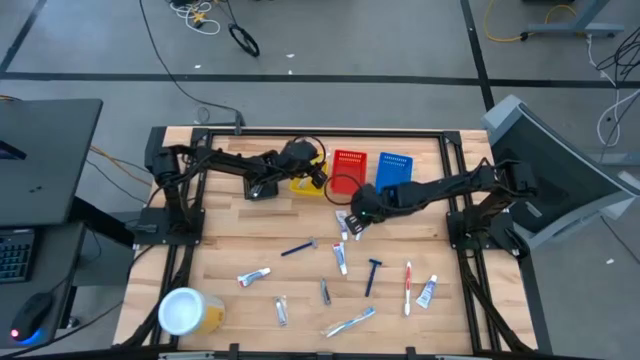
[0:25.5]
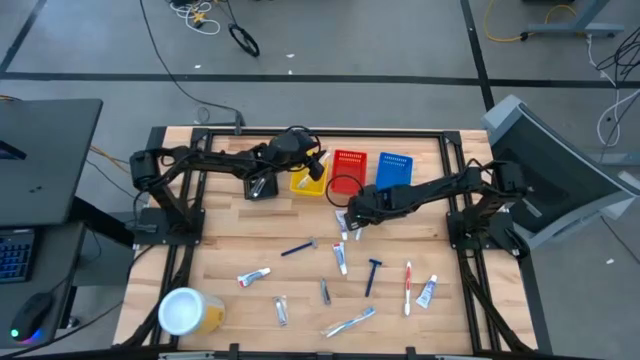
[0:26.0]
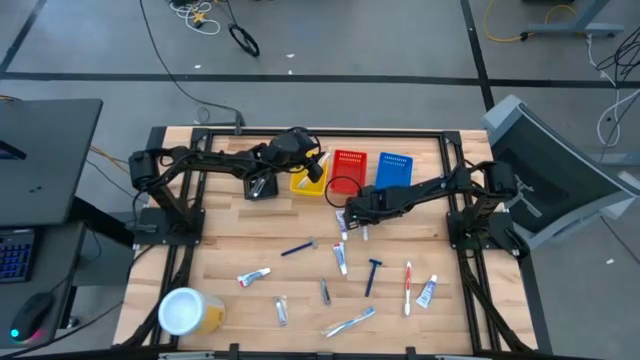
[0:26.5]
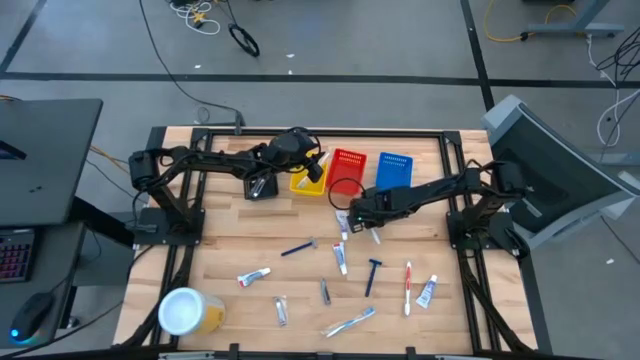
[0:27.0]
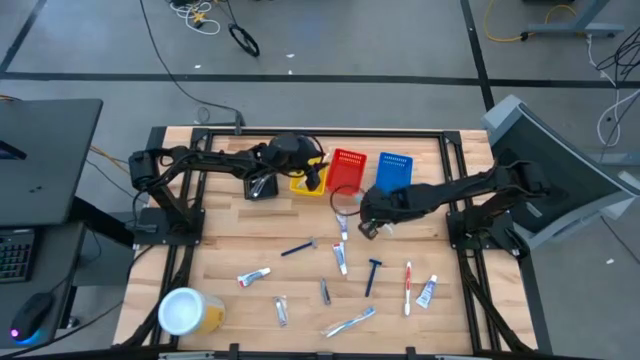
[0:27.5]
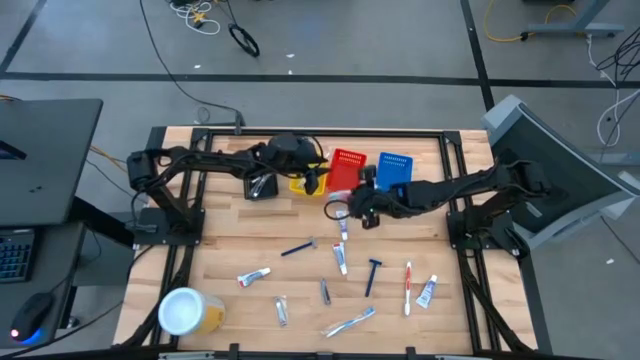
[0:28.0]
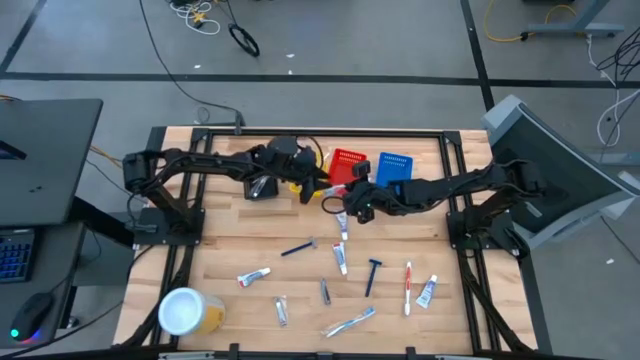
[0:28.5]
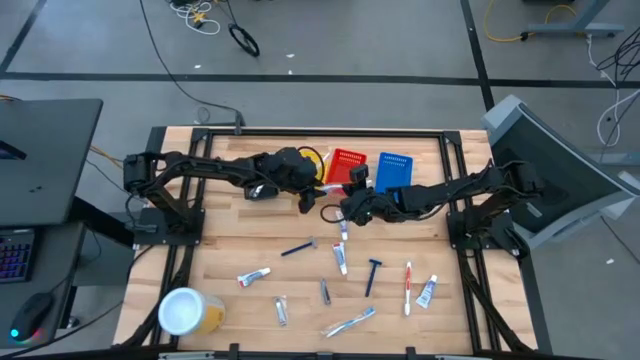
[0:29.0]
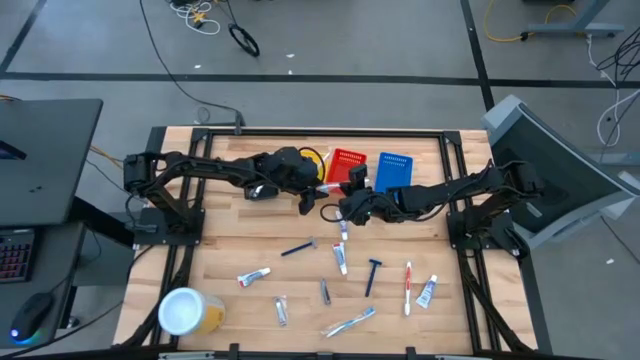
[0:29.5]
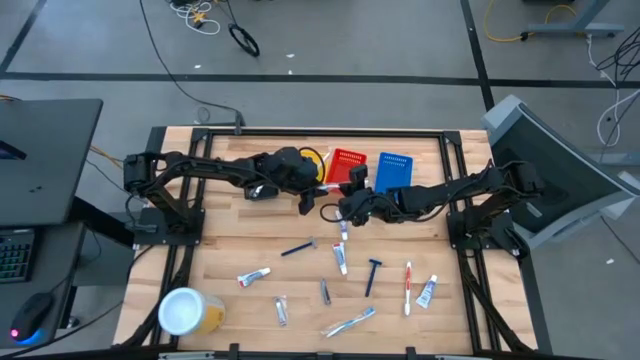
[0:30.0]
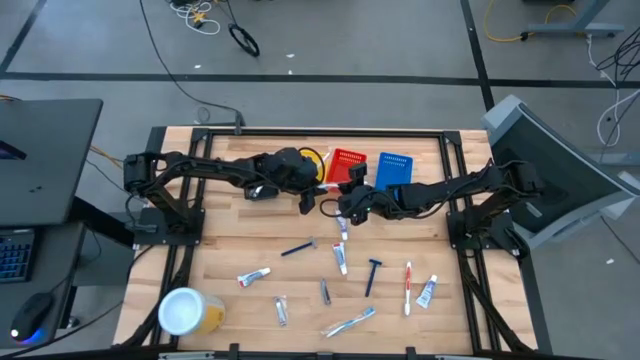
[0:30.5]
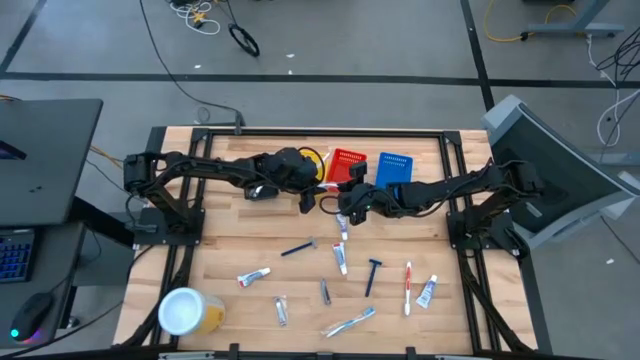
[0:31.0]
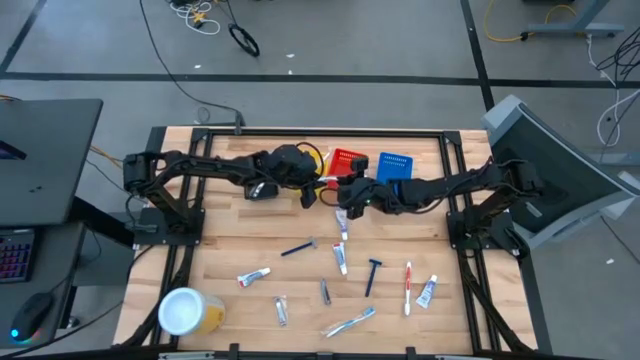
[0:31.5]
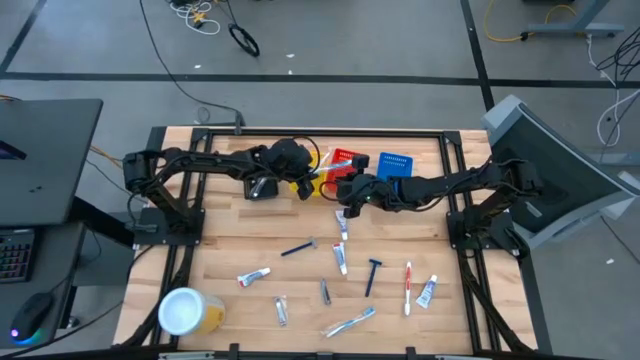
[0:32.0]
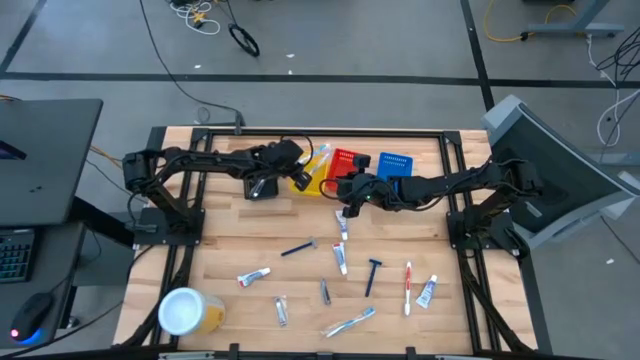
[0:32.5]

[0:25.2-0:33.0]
Task: Pick & Place Travel size toiletries
Put the blue toothbrush into the yellow bin

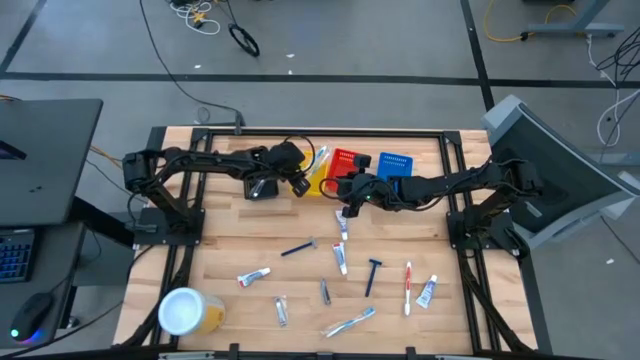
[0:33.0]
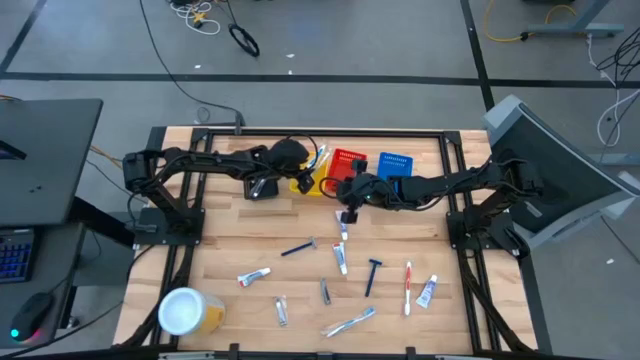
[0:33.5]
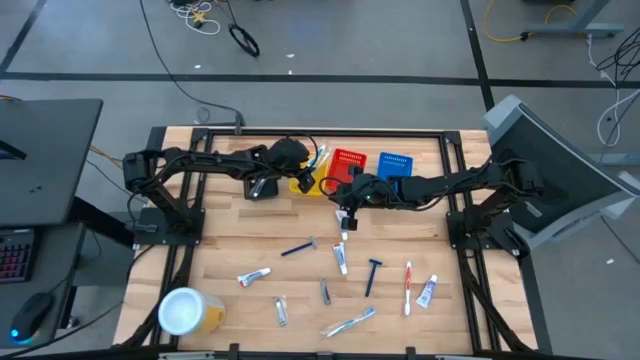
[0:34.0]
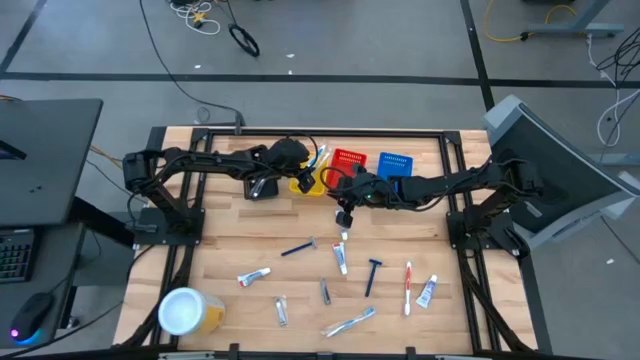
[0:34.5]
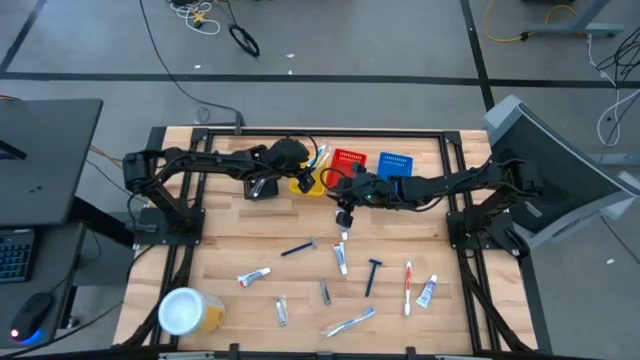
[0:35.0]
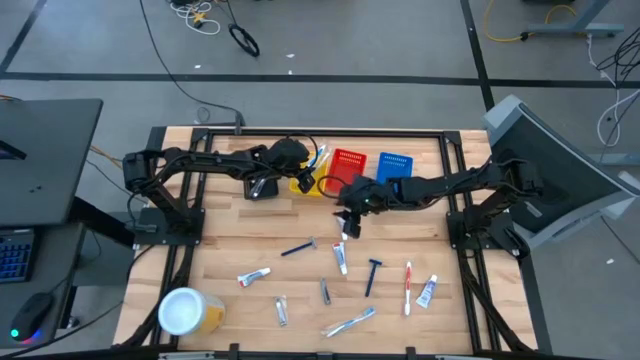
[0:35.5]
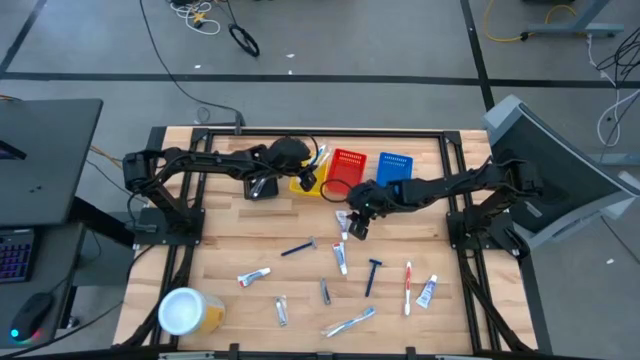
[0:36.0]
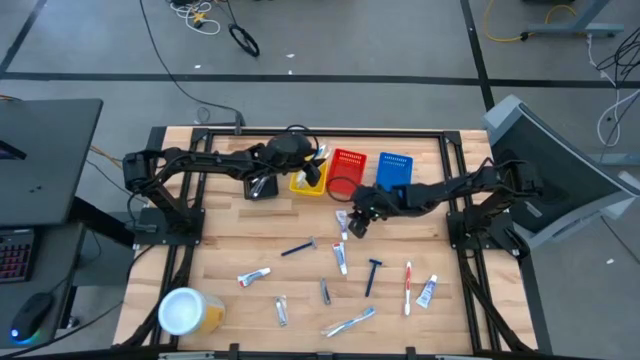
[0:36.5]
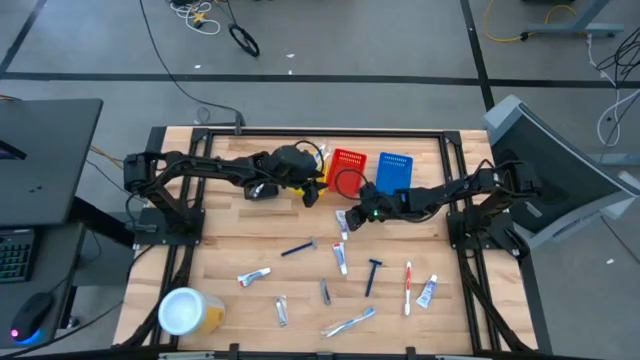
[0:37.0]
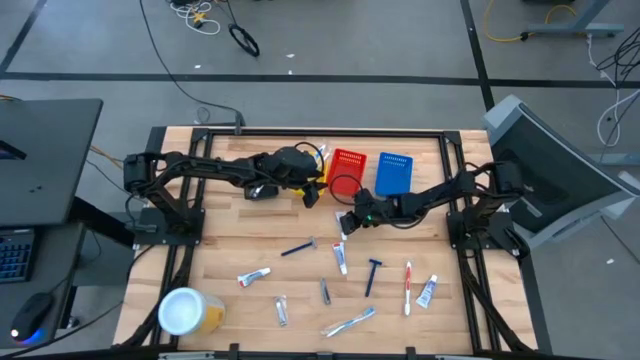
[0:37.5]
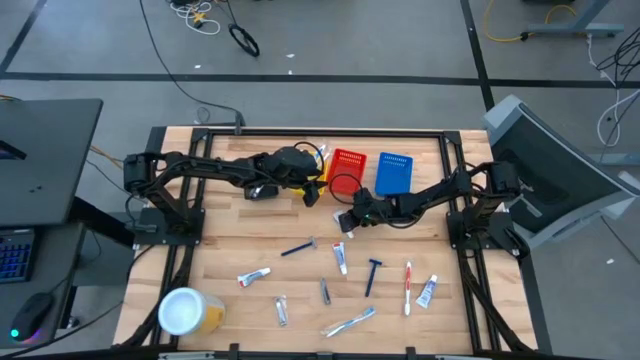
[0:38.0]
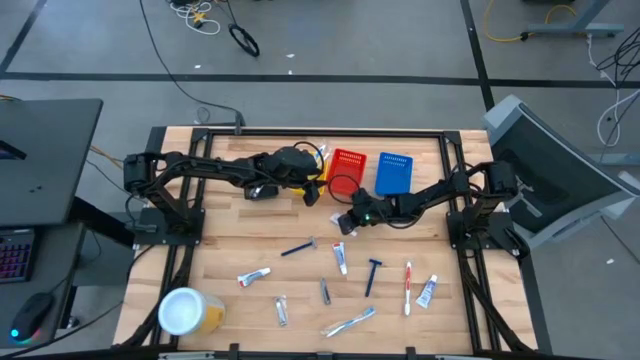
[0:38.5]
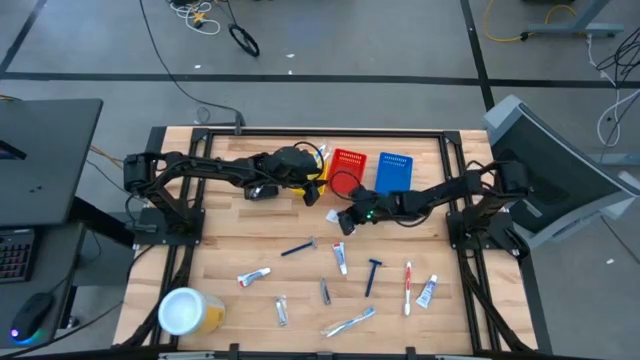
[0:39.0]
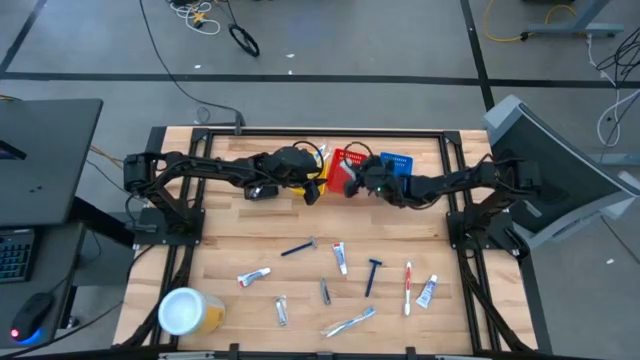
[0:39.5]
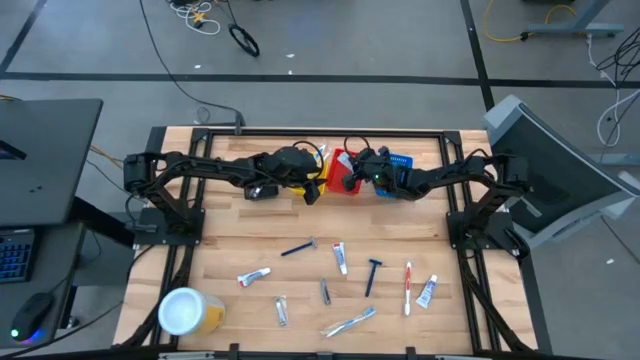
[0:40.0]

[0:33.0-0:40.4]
Put the white toothpaste into the red bin

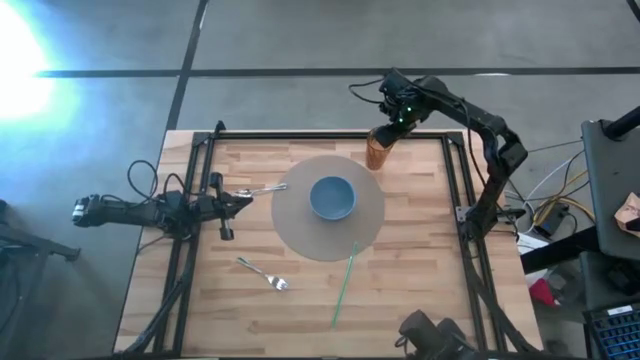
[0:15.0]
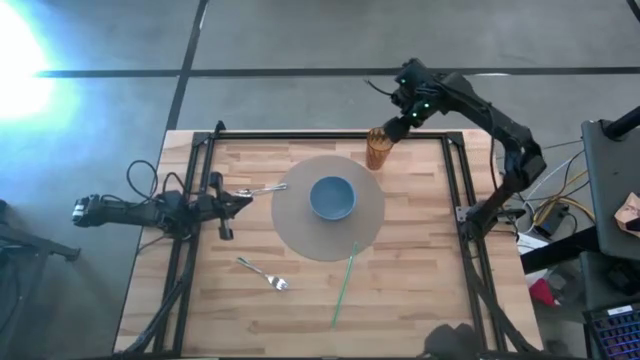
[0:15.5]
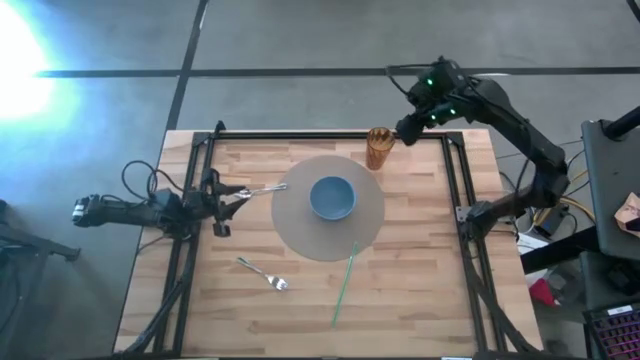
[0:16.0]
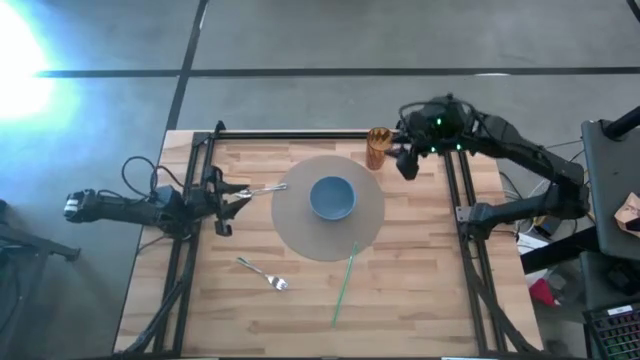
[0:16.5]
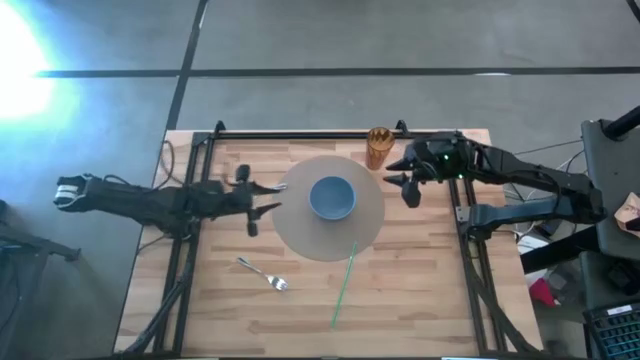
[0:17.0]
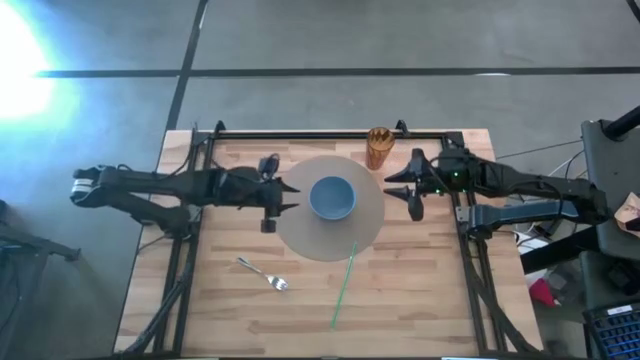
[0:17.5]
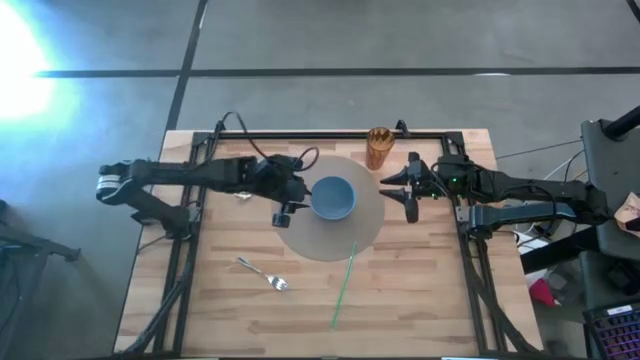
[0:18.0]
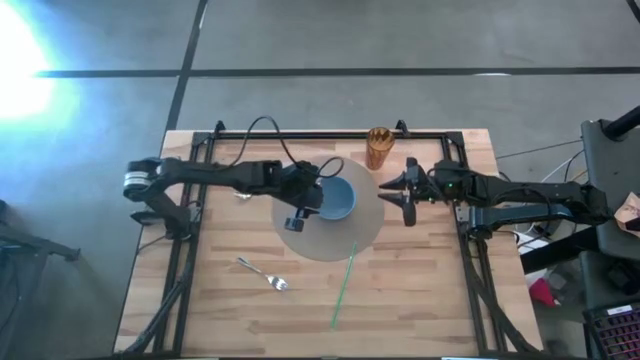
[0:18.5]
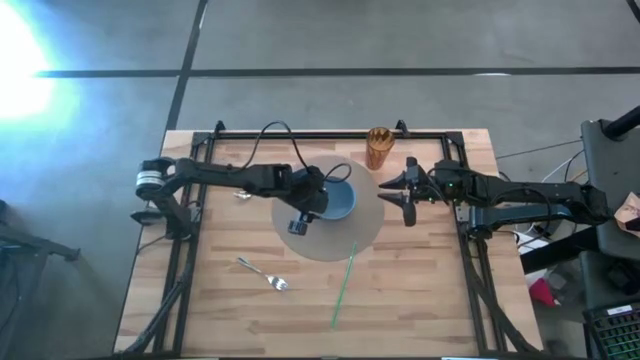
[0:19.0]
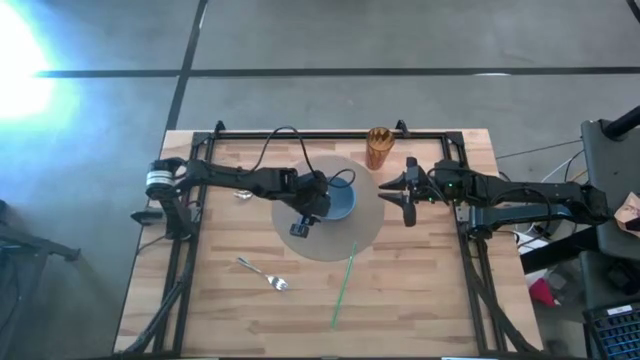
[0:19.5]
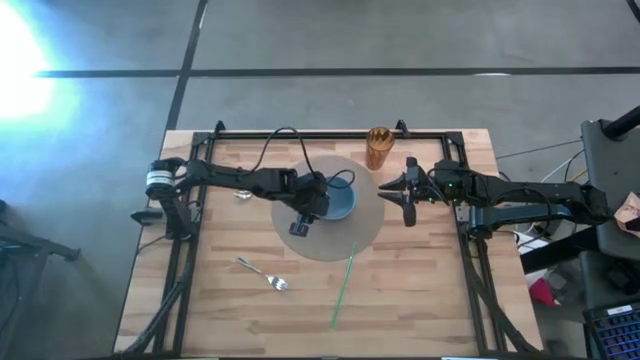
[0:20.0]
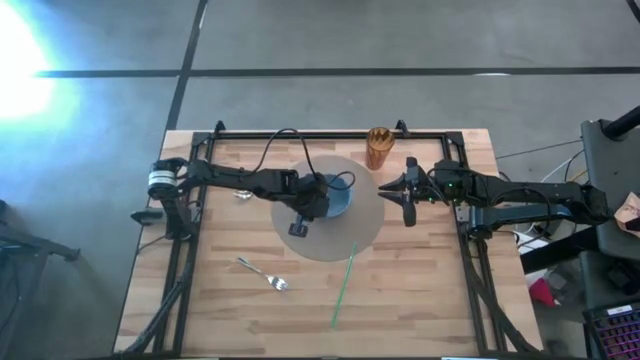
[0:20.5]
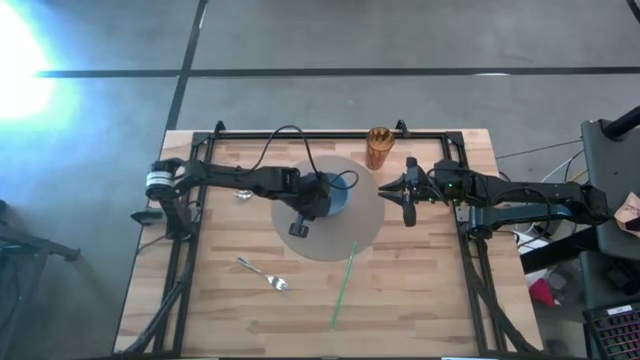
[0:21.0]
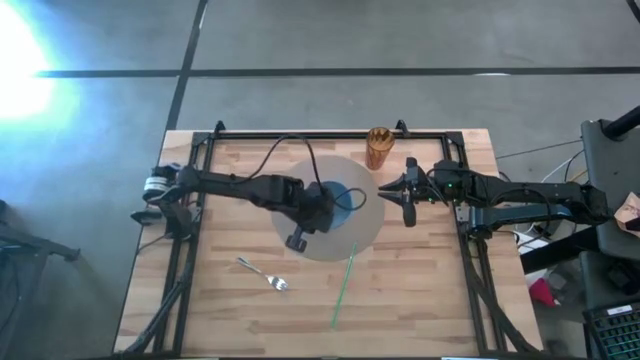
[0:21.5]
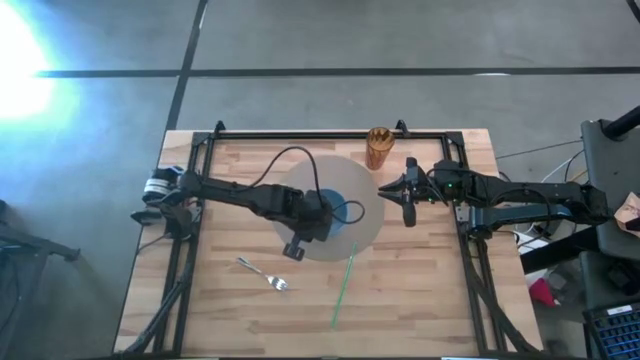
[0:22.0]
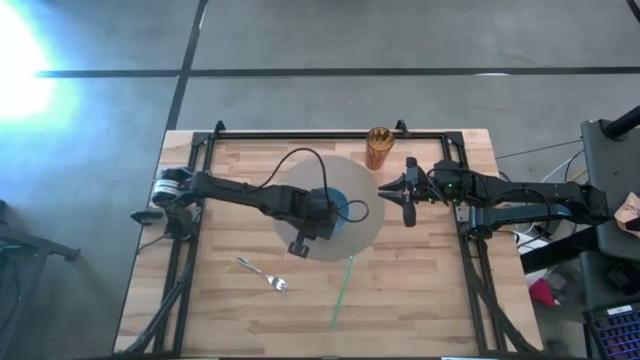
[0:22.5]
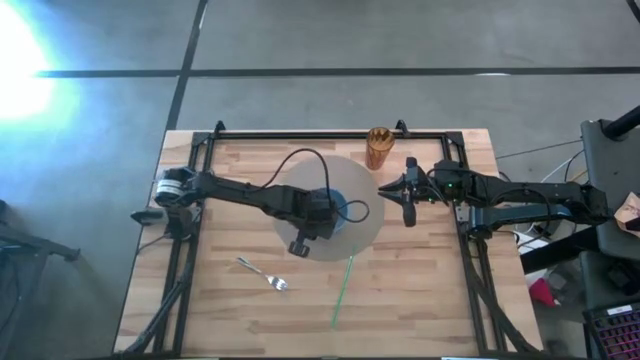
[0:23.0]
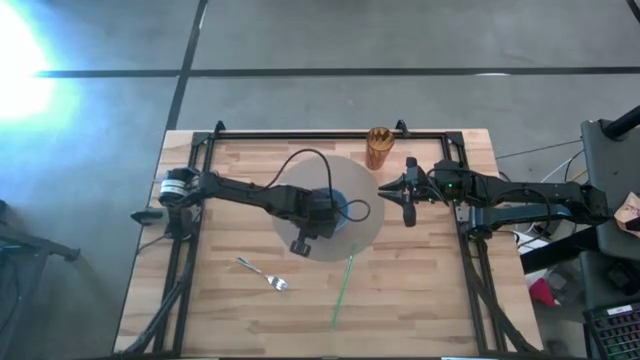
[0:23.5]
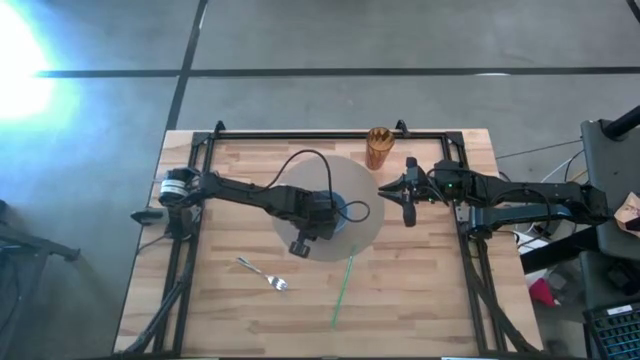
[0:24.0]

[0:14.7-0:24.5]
Task: Pick & Place Utensil
Move the bowl to the center of the placemat
